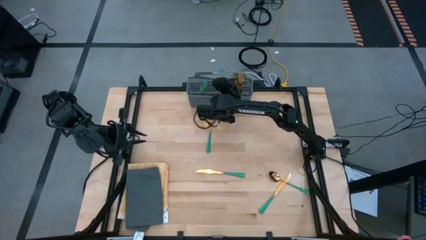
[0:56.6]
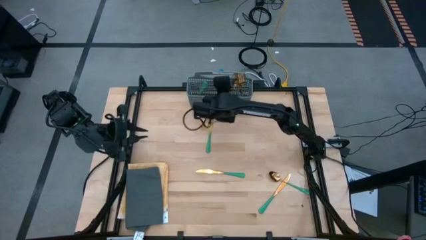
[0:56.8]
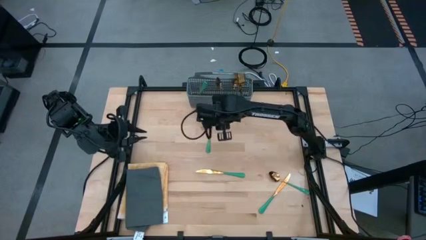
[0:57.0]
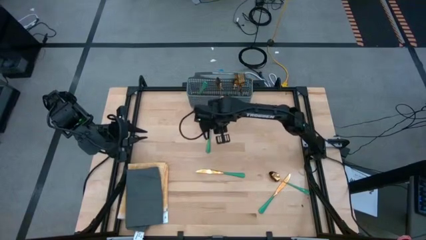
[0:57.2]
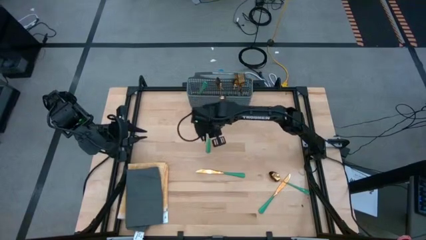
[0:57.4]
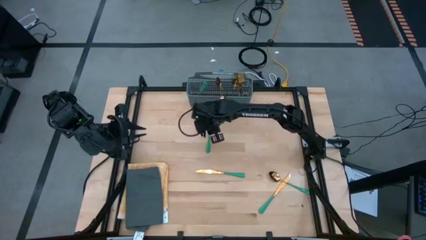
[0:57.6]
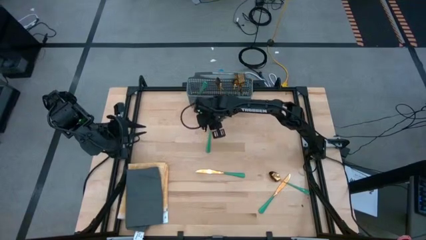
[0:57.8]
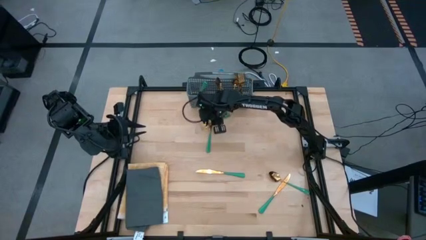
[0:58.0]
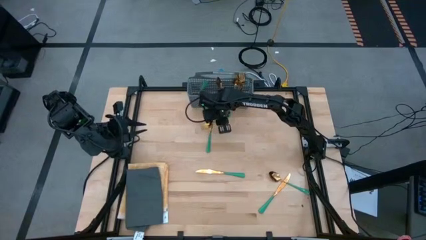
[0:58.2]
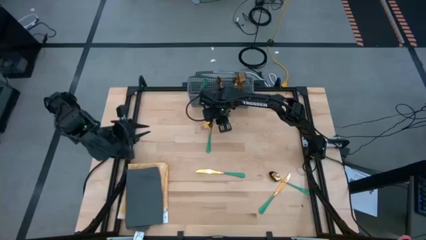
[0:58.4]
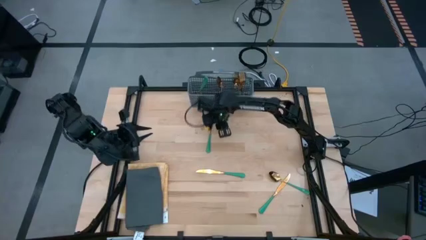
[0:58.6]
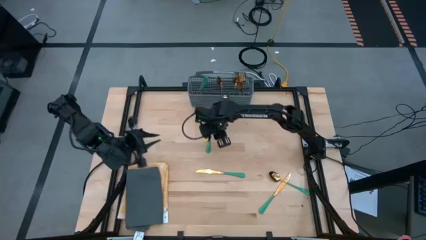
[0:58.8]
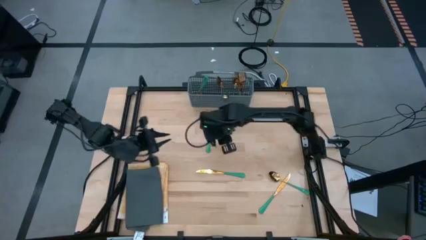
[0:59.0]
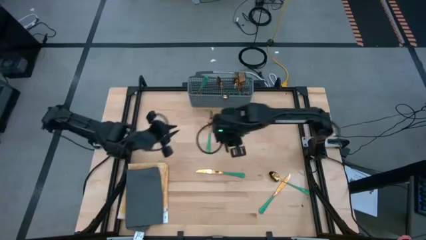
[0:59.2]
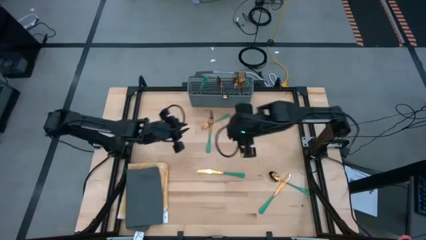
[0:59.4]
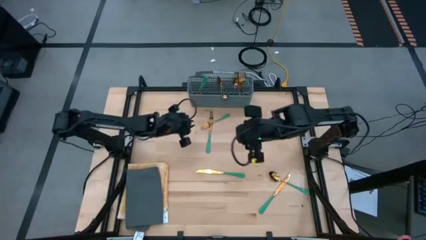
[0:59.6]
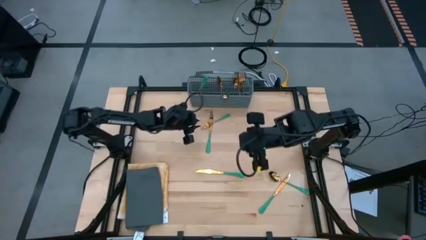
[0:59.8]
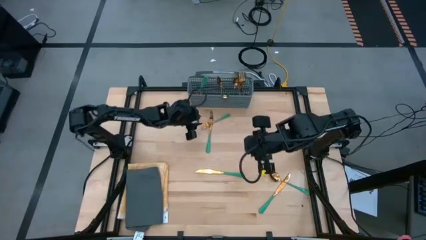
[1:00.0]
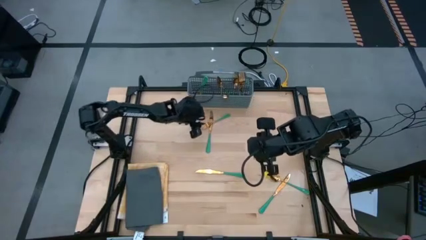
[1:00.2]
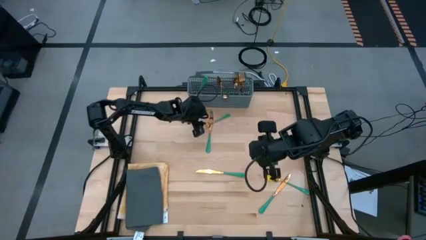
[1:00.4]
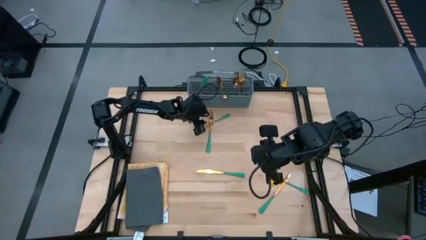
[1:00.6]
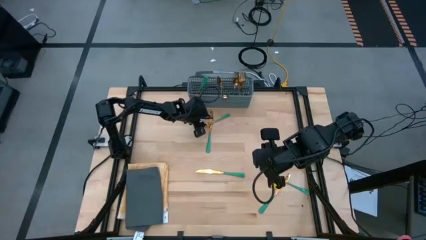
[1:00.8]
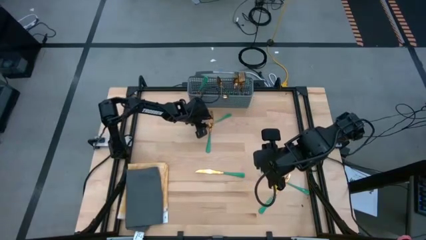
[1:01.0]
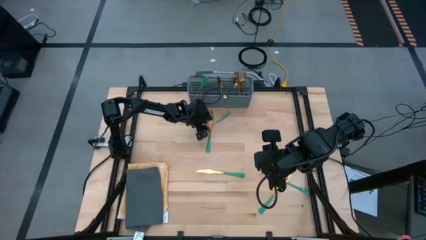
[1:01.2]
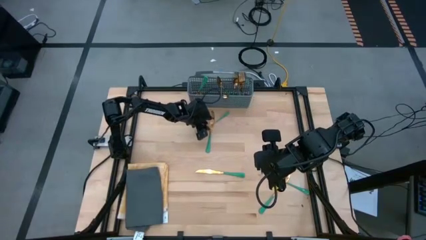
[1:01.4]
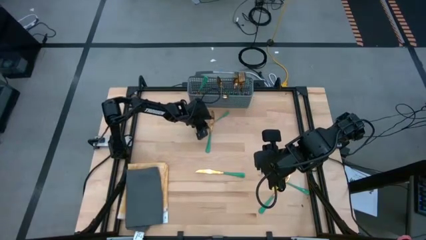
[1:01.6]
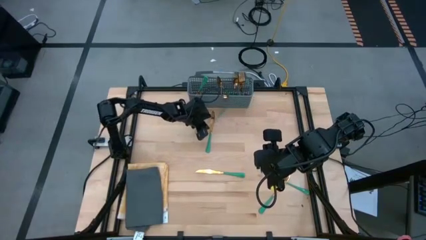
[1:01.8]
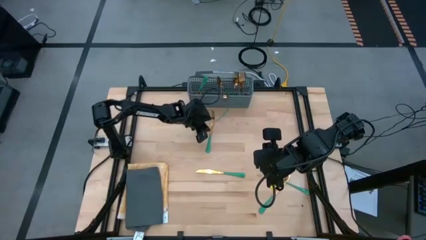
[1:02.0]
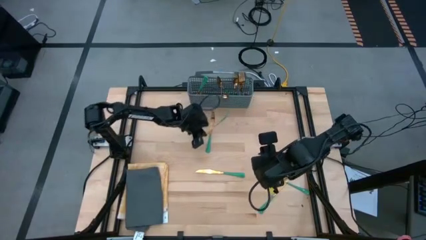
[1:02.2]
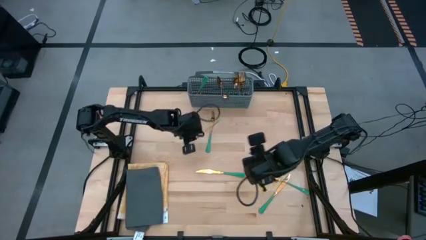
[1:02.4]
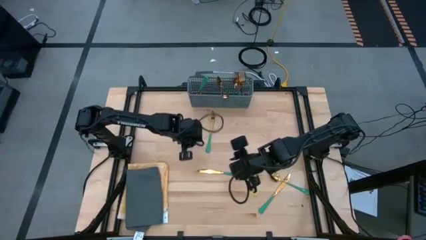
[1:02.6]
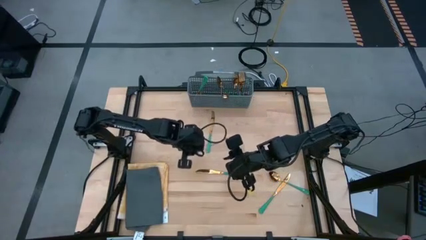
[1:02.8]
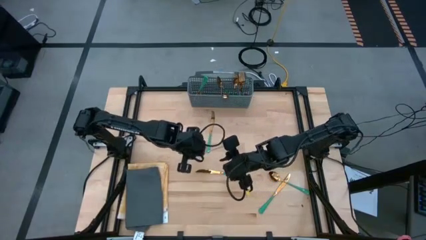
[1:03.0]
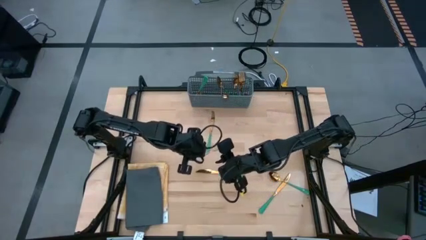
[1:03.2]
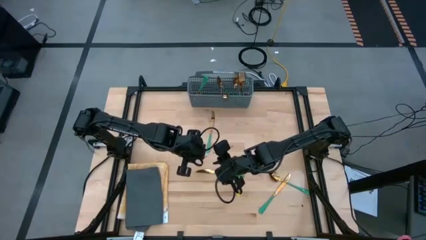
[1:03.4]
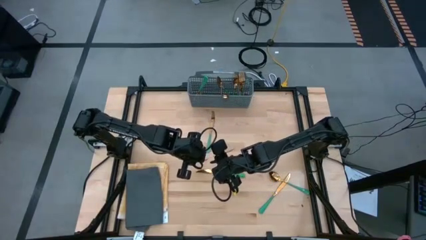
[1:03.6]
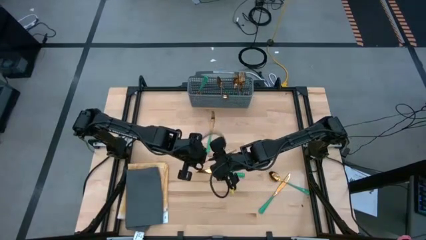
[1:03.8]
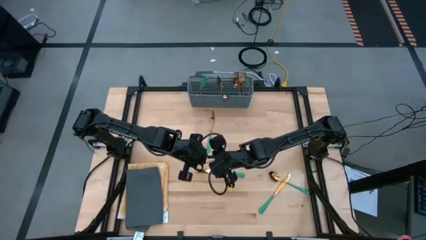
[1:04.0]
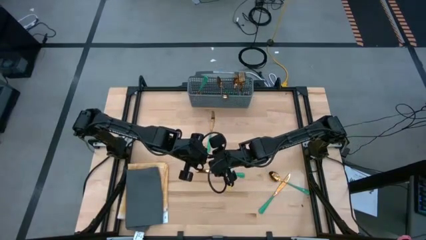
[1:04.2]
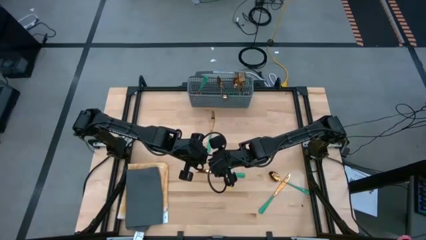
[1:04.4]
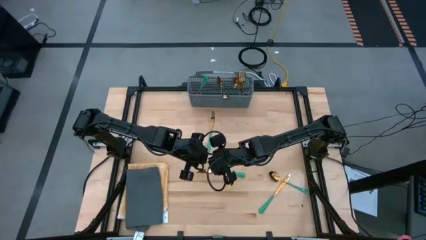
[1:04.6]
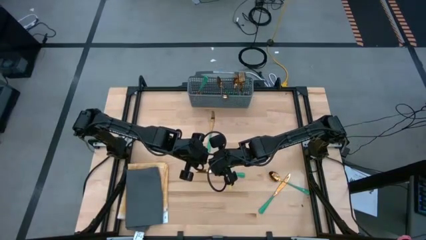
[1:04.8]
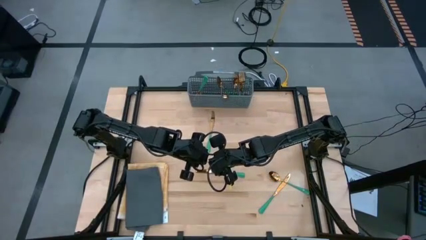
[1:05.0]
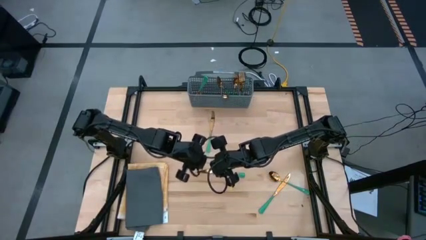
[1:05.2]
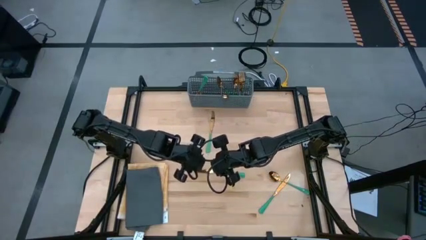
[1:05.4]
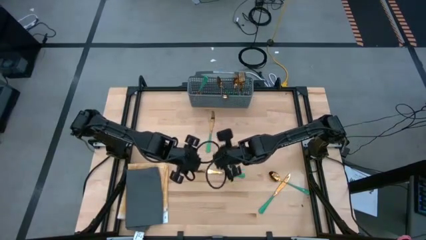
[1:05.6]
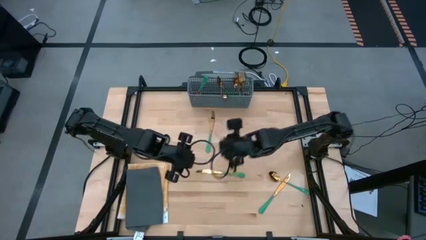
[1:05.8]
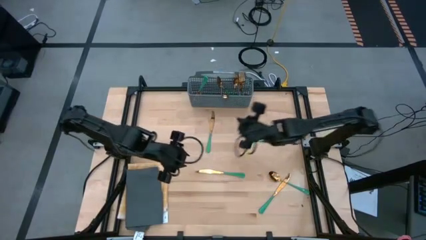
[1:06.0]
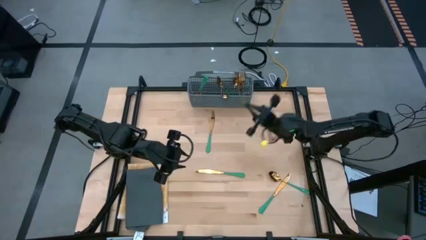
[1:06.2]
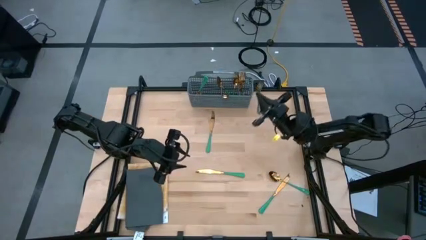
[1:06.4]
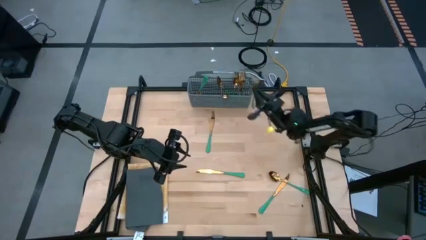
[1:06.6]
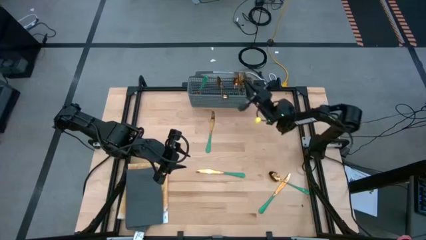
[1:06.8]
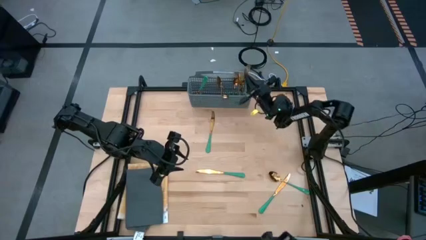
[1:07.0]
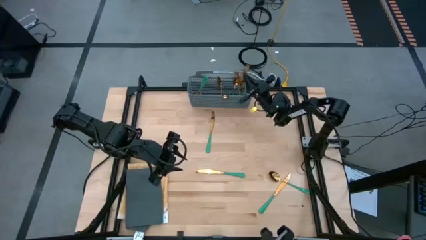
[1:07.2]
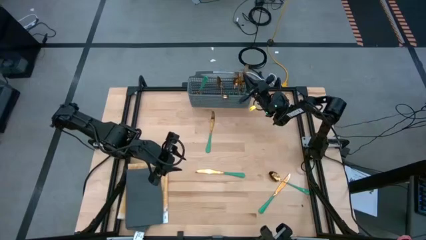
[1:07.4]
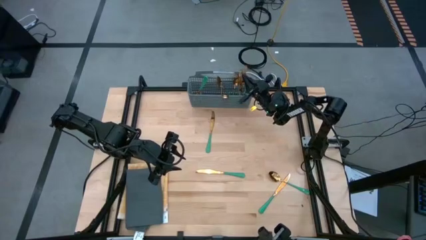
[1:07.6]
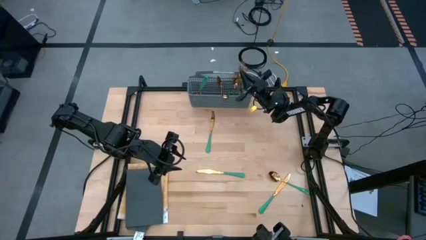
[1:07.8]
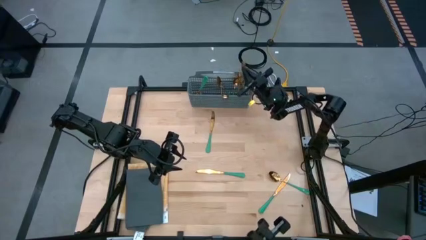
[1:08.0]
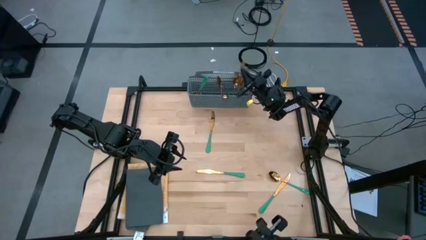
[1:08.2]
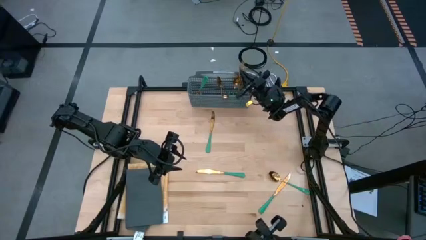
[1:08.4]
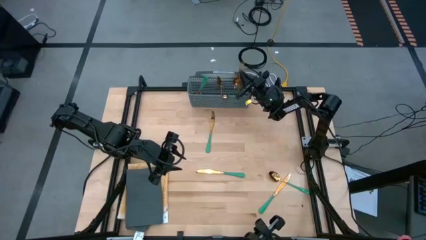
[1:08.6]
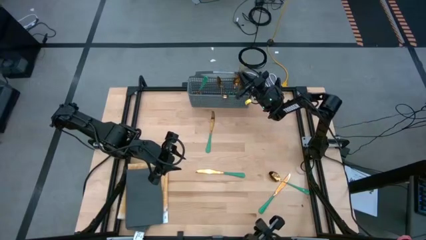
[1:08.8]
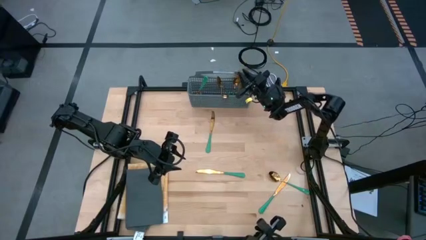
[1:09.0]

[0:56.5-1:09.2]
Task: Sort silverware
Put the green fork into the gray silverware holder

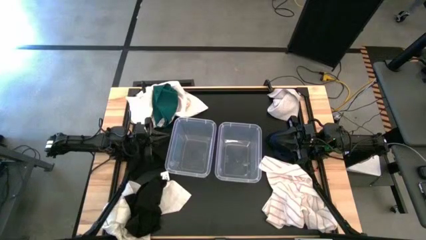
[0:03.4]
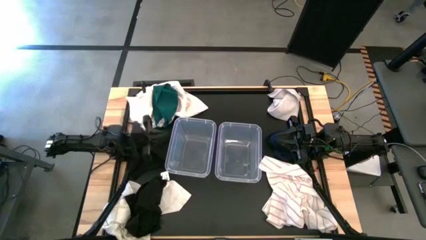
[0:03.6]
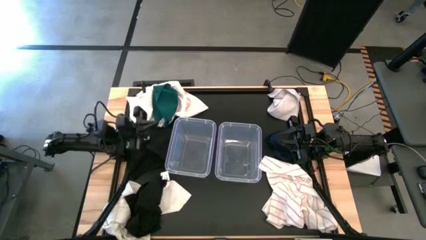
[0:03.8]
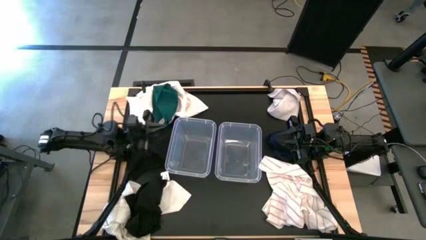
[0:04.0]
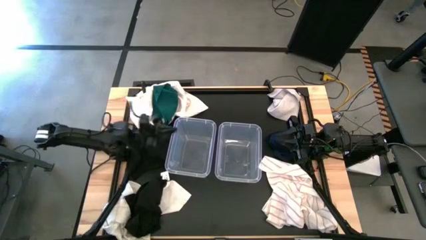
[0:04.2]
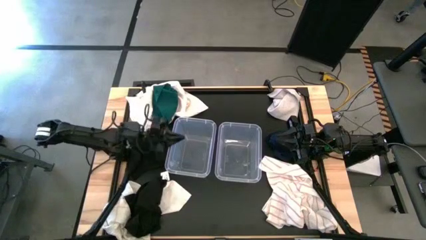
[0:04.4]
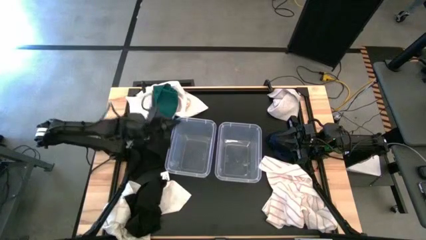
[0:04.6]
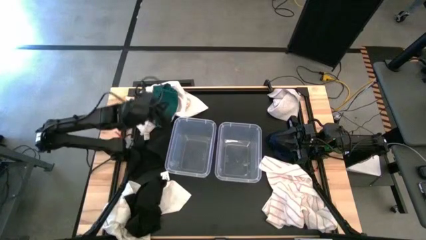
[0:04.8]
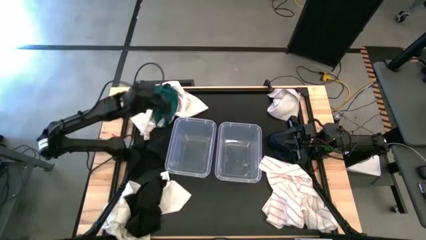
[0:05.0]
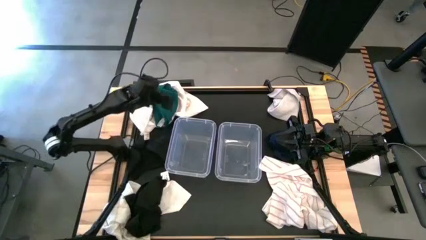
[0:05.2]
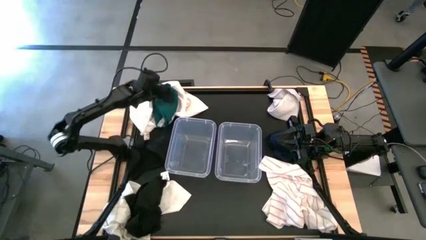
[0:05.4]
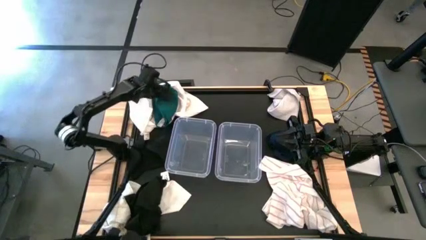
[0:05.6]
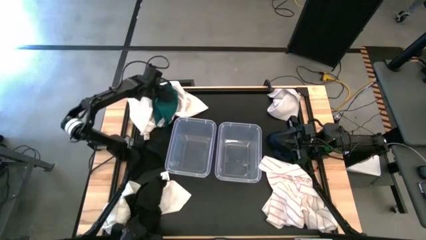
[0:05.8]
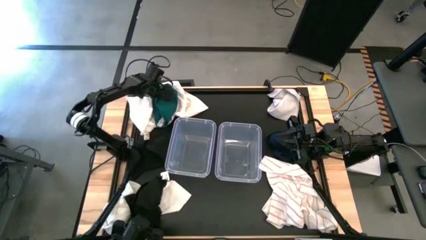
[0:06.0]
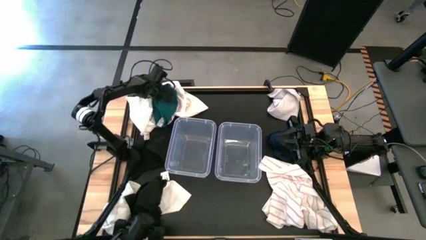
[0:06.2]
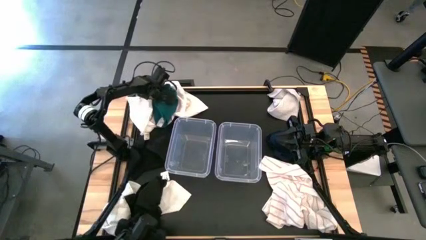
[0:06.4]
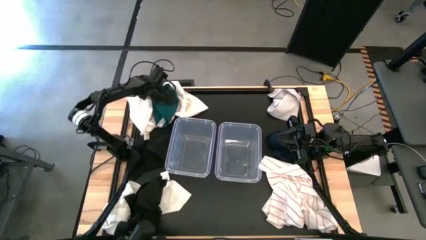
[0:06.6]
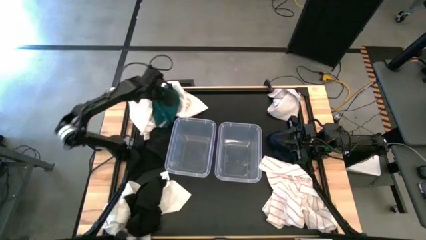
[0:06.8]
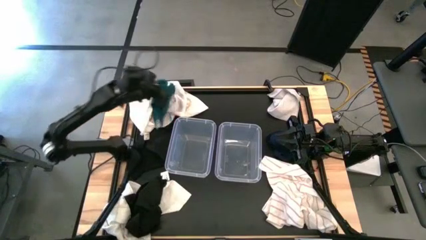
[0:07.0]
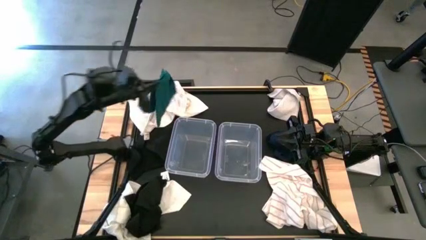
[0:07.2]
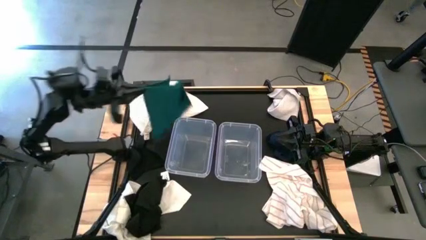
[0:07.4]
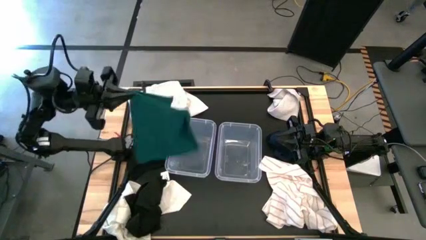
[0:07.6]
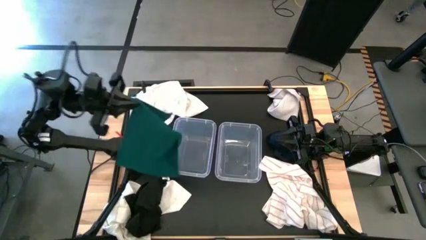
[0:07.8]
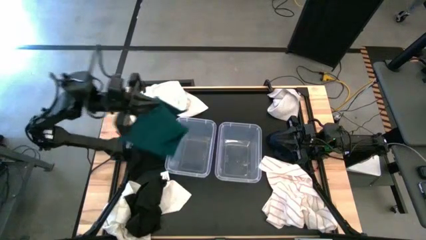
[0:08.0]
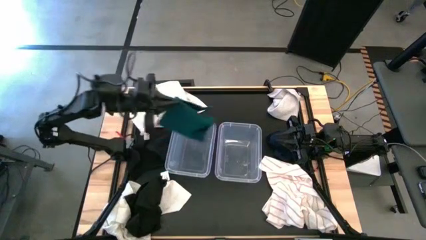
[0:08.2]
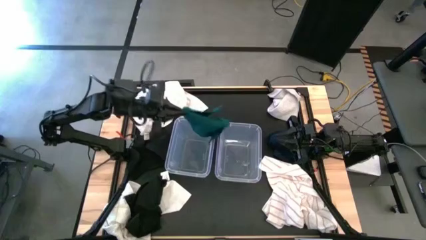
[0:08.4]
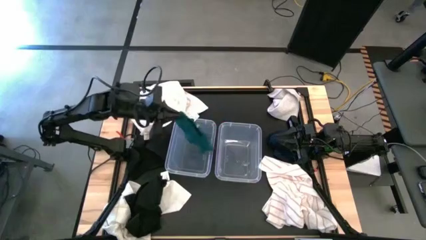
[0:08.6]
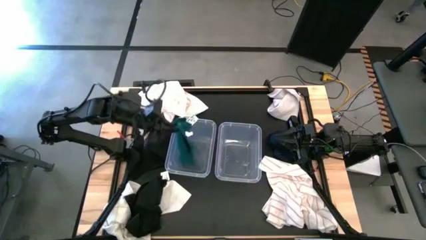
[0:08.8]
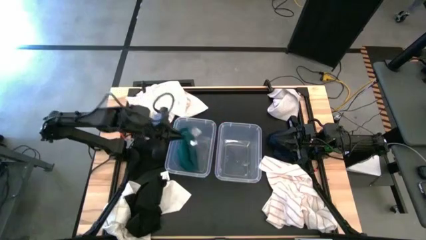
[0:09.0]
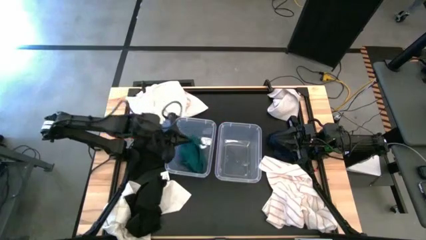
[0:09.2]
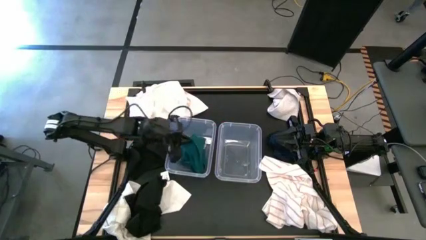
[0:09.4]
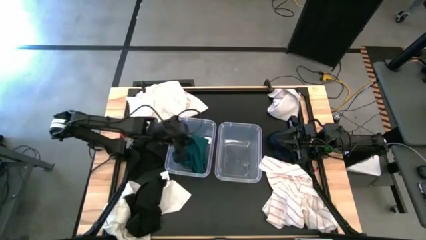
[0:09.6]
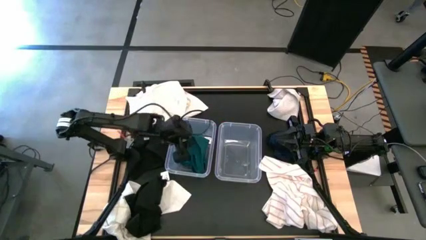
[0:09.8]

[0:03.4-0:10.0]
Task: Sort towels by color in basket
Put the green towel into the left transparent bin
